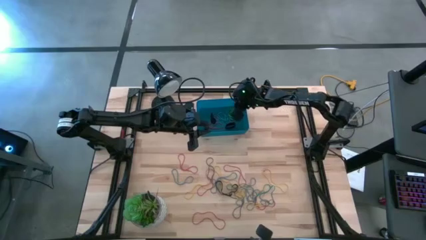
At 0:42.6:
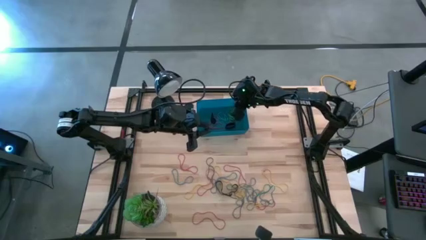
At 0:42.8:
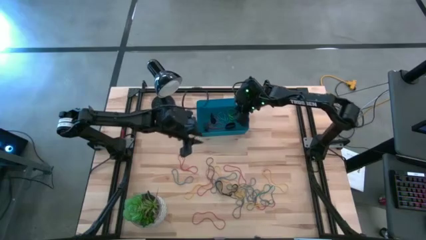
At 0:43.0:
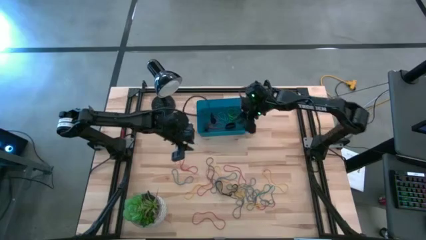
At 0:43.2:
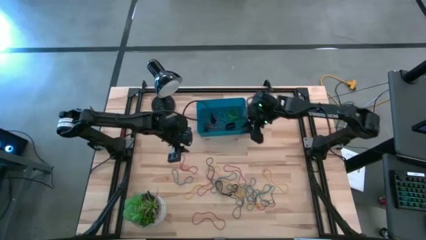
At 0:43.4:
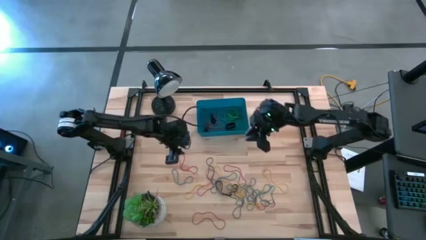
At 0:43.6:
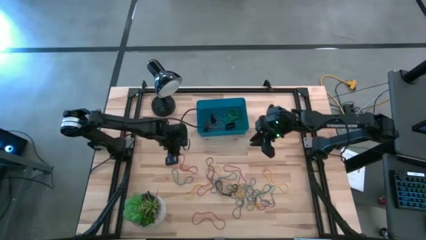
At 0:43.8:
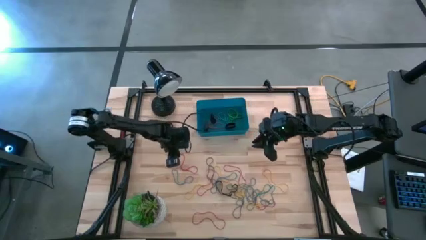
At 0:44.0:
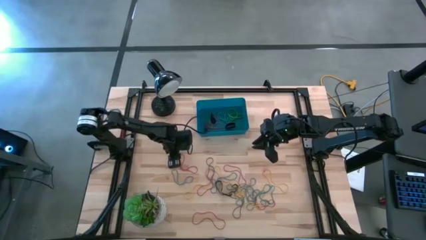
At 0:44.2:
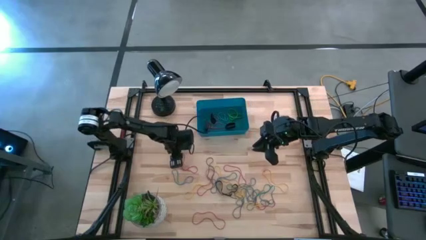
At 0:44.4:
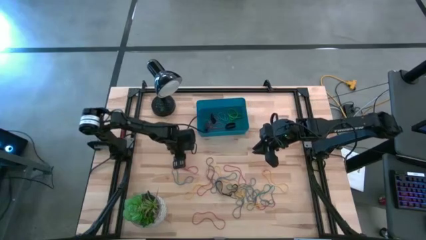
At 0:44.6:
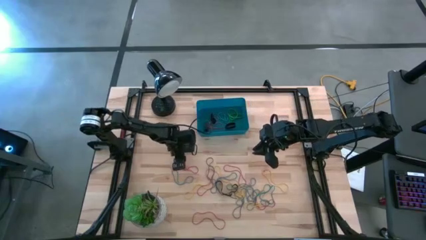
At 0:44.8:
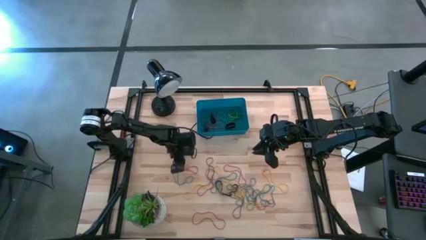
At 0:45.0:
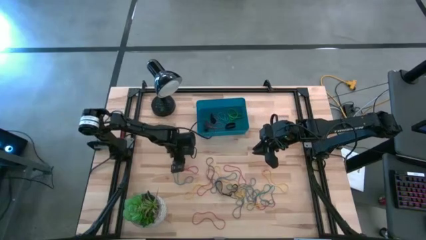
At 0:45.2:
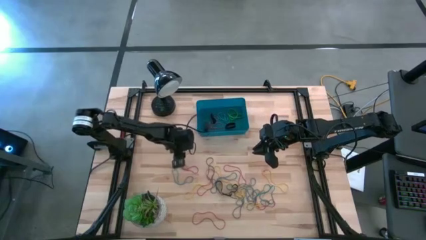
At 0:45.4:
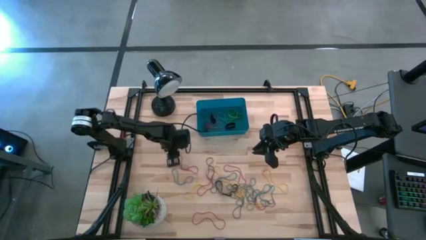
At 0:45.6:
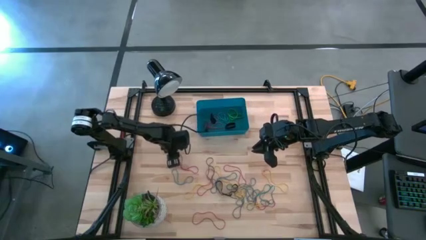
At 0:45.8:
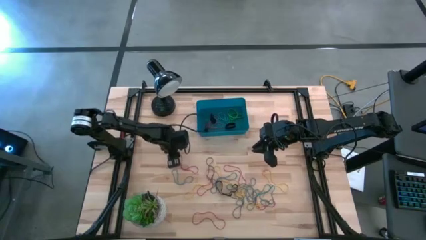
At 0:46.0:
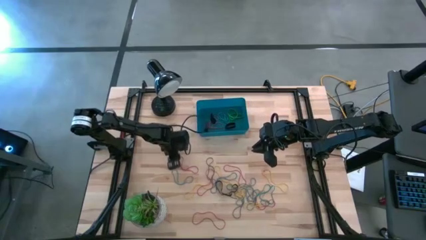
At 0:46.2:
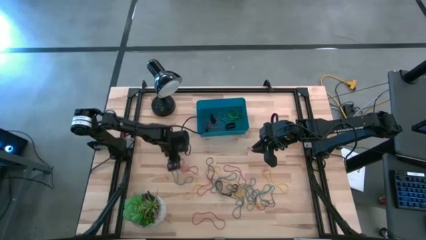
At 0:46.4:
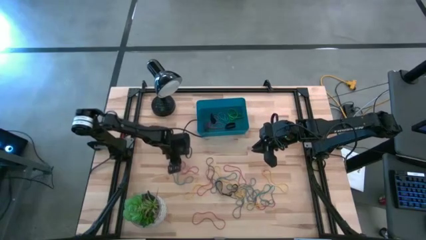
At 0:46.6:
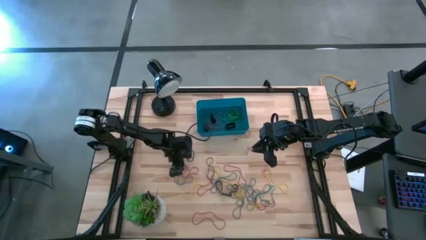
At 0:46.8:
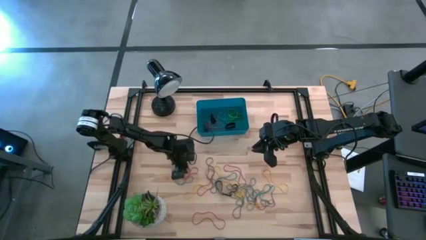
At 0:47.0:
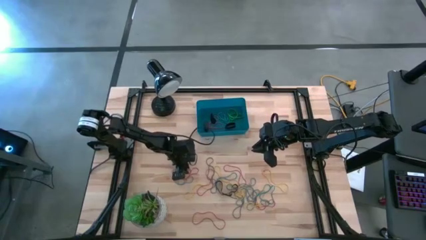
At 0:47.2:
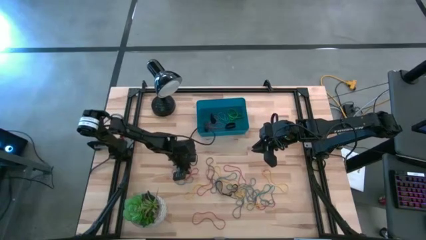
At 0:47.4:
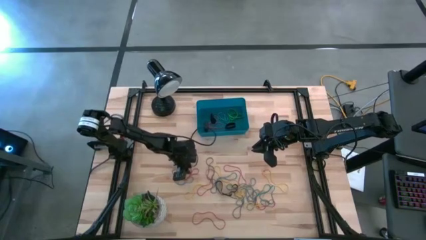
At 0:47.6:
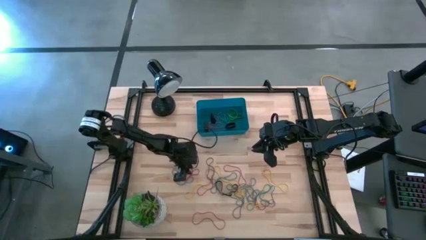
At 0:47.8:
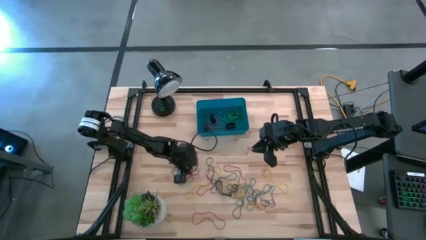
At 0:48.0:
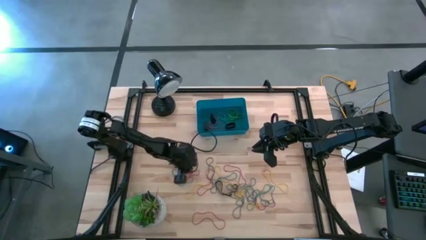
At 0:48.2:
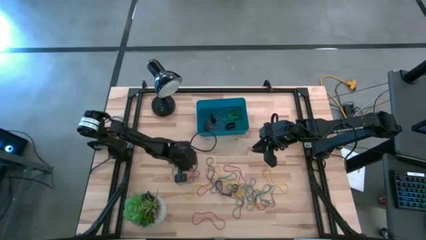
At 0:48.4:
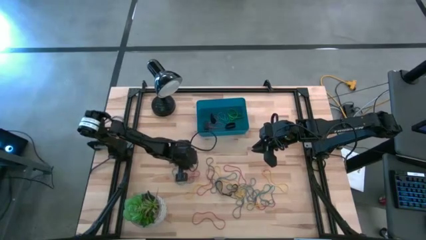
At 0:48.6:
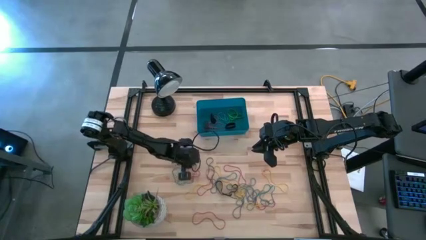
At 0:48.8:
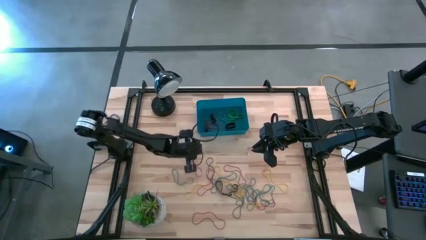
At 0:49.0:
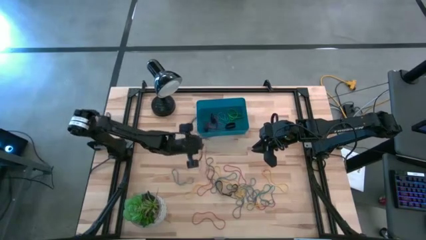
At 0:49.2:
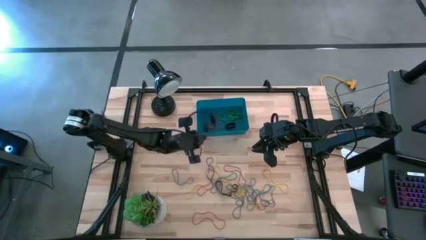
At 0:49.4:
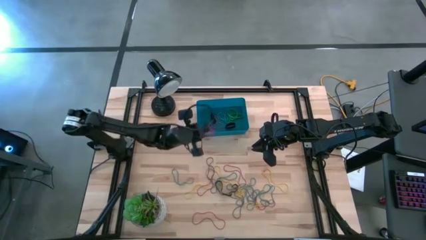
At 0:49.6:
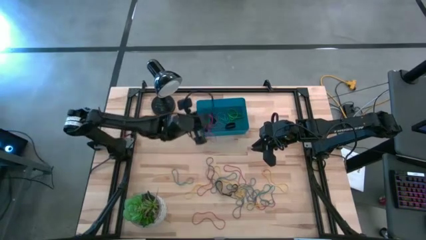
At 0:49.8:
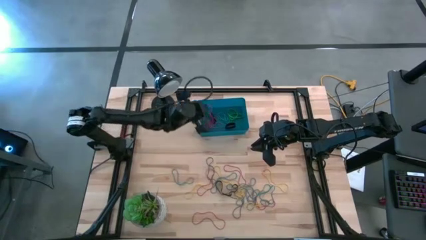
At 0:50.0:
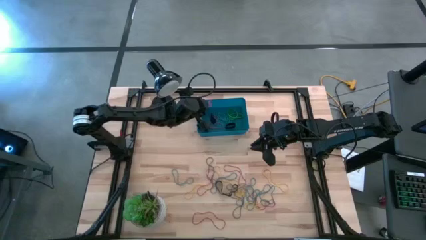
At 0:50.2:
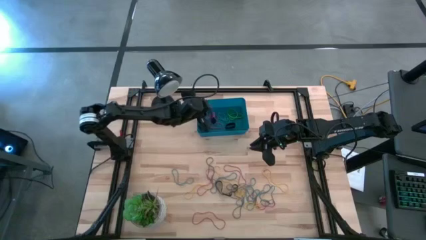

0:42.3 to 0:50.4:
Task: Pick and place rubber bands into bin
Put the red rubber band into the blue bin

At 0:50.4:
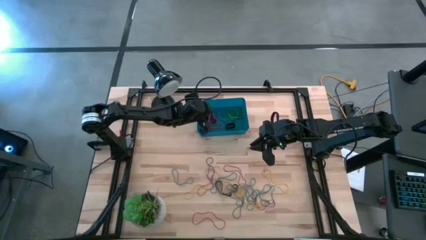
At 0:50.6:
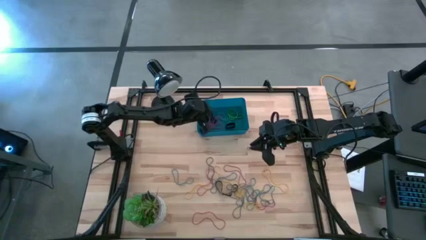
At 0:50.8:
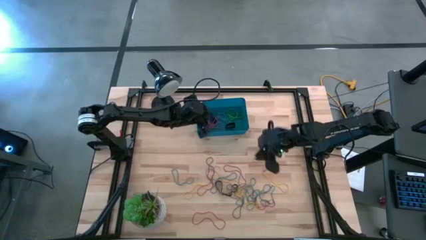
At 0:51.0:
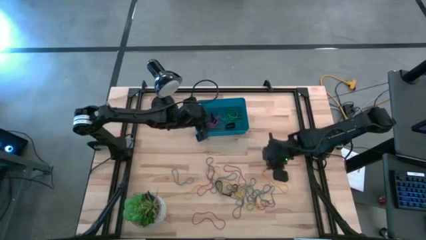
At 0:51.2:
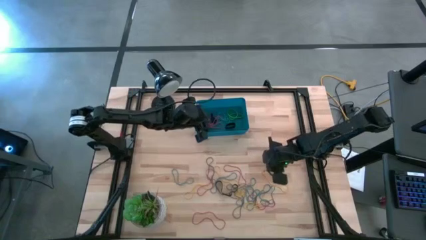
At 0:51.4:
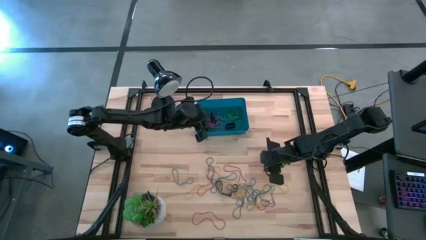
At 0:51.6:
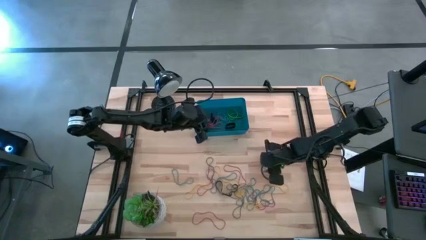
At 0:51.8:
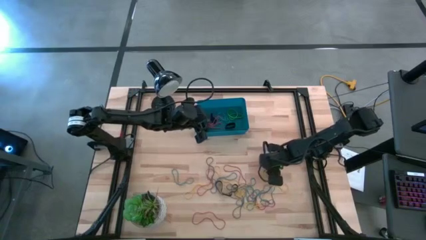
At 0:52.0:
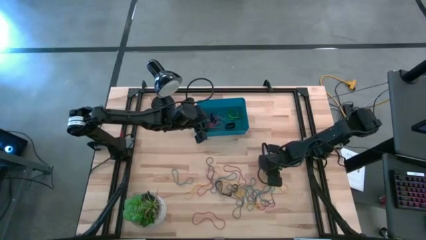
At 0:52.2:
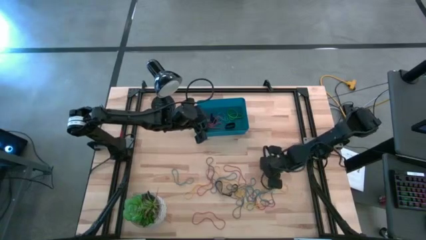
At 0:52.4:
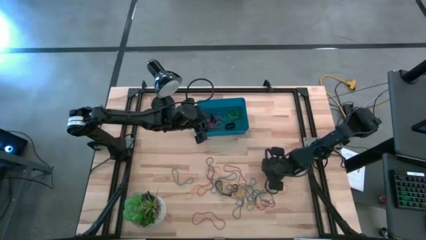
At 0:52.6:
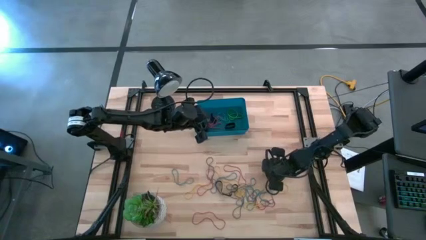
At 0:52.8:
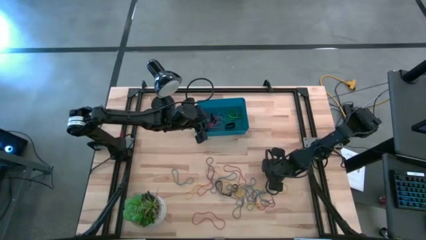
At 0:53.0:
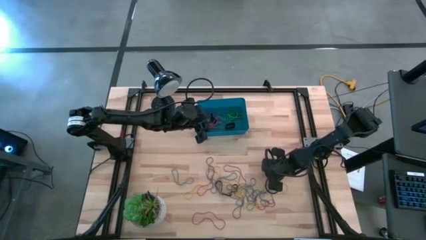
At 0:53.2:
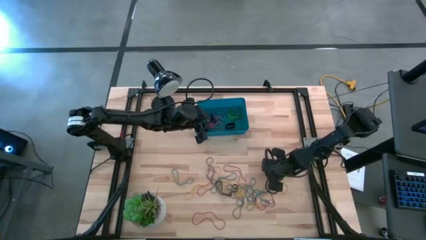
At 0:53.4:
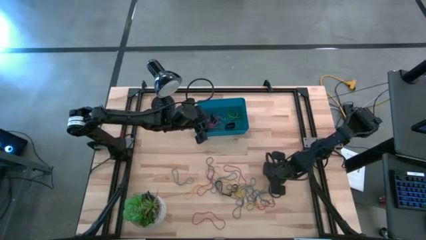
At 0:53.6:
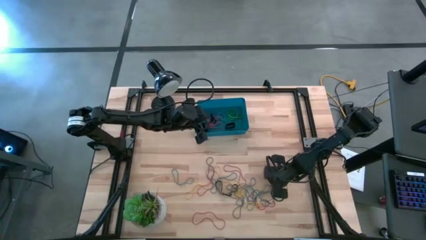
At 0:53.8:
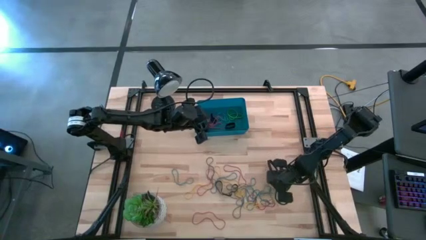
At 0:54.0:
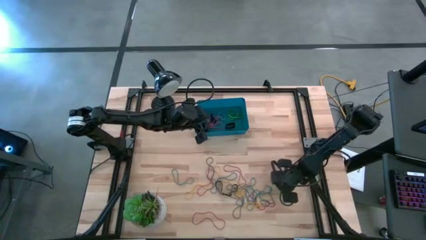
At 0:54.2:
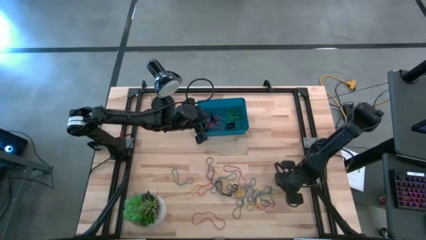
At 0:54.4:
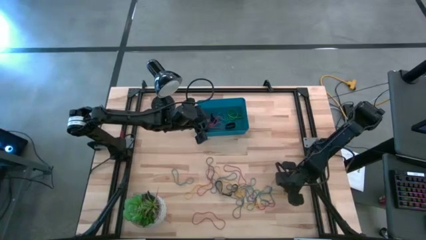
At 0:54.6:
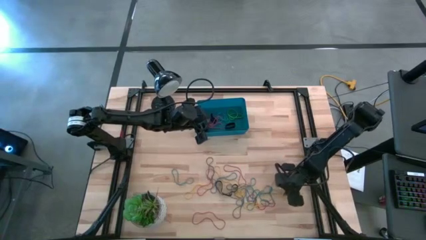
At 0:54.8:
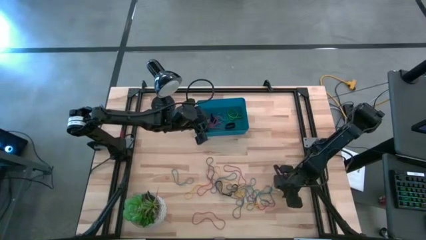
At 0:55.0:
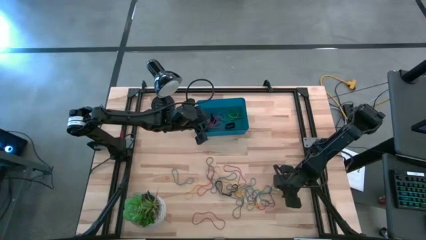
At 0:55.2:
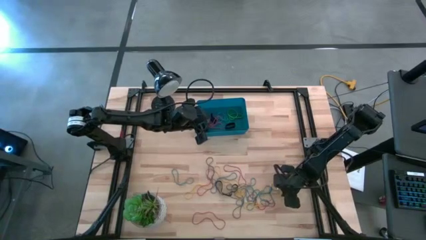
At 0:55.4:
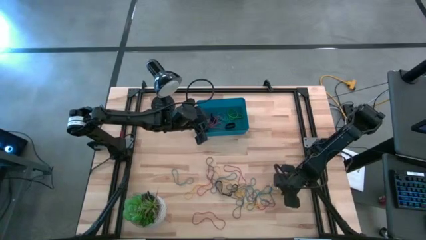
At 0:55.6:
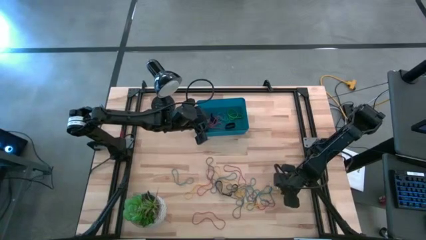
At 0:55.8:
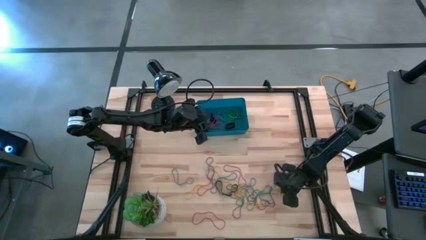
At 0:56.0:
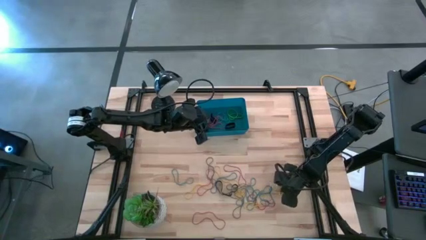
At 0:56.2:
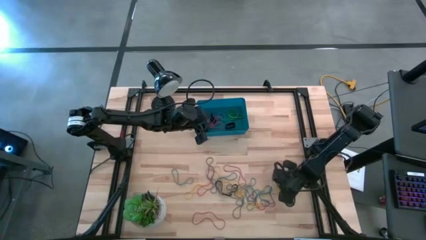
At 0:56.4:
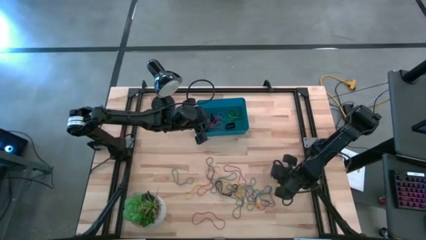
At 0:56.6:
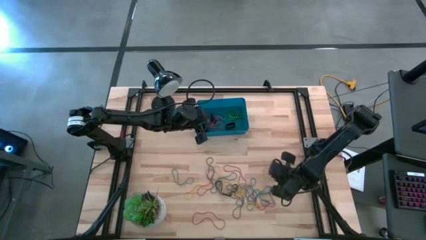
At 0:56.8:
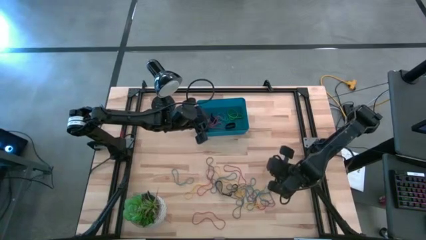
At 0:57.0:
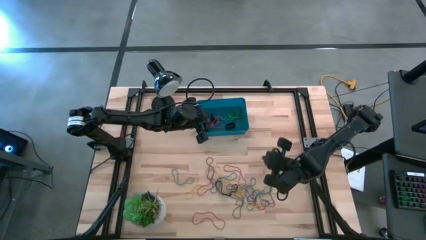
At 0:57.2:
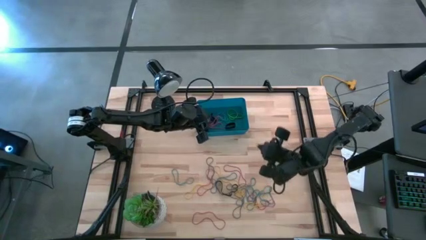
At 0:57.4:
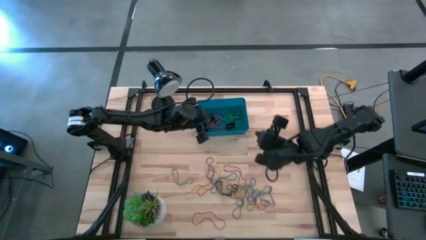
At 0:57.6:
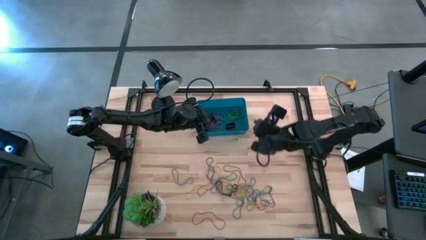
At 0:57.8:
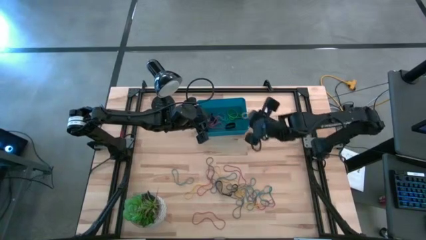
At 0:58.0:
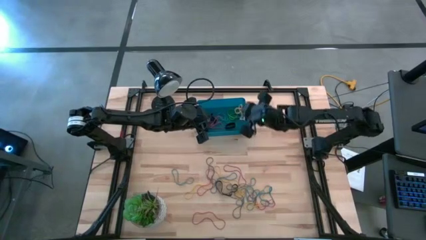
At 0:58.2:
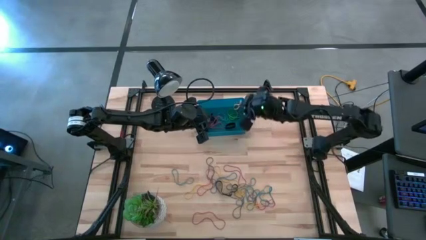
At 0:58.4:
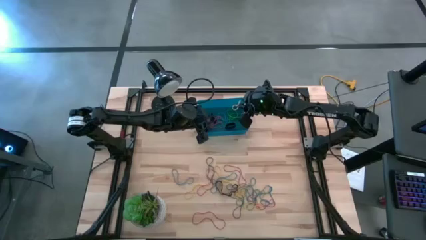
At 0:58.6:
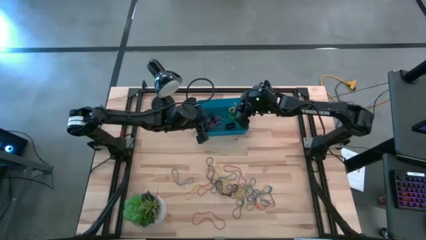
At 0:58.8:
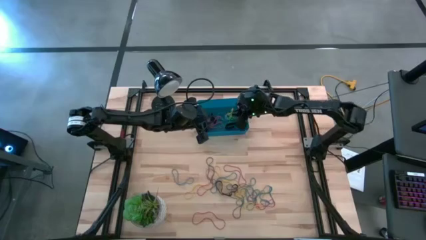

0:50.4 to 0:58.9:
Put the yellow rubber band into the blue bin
